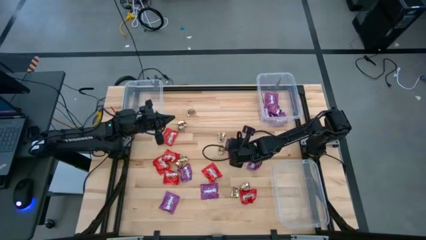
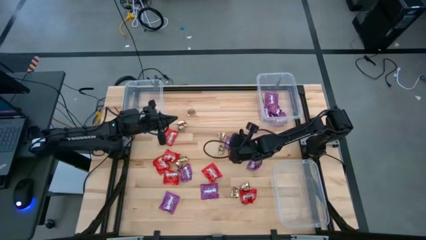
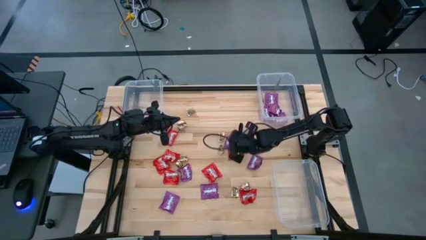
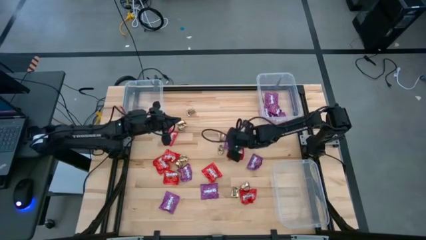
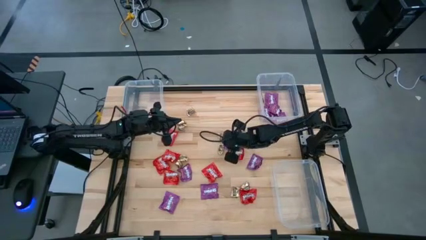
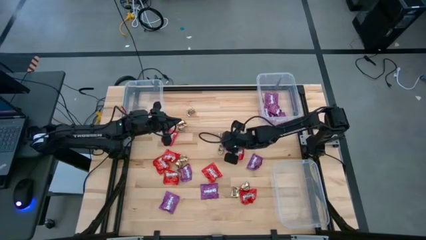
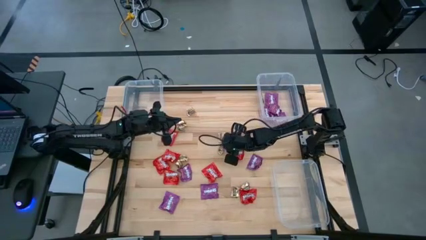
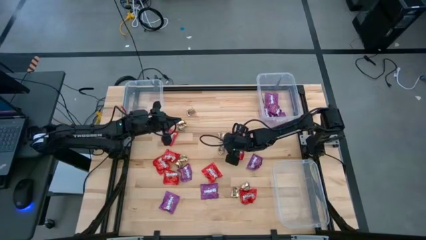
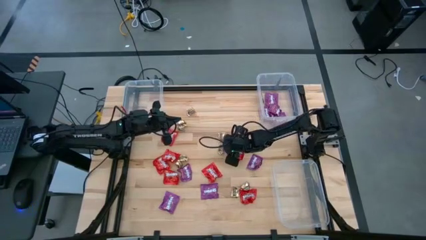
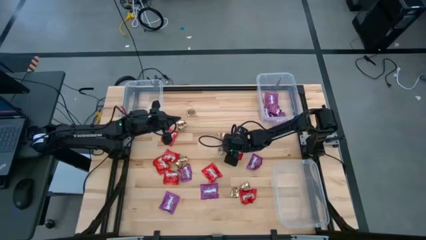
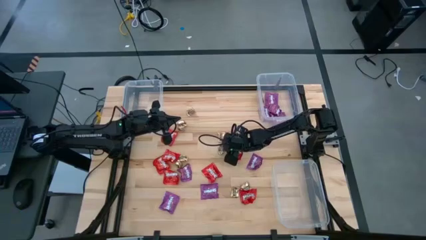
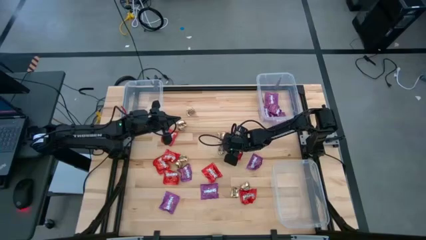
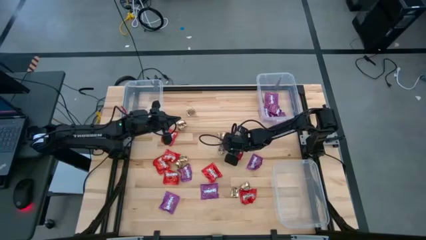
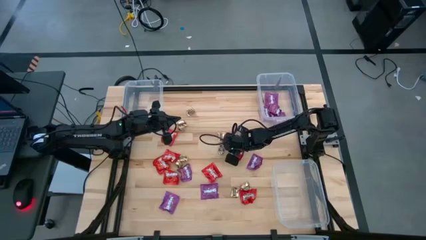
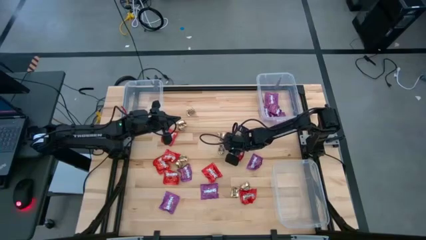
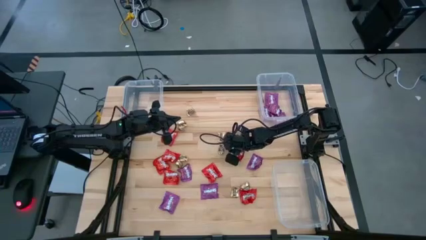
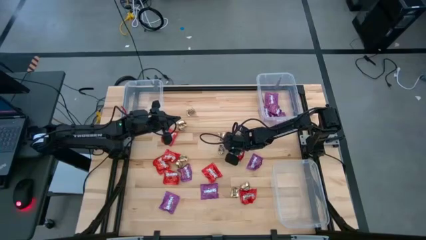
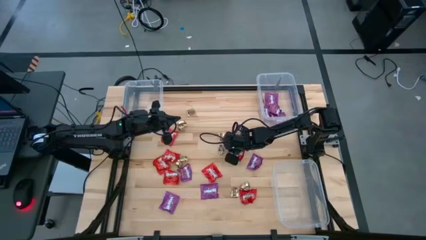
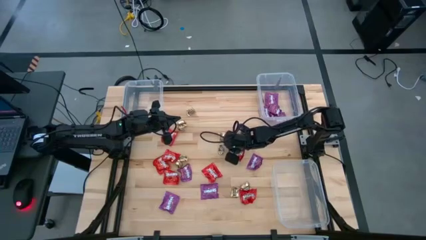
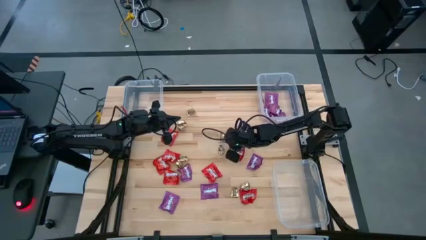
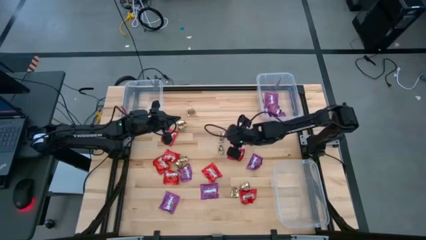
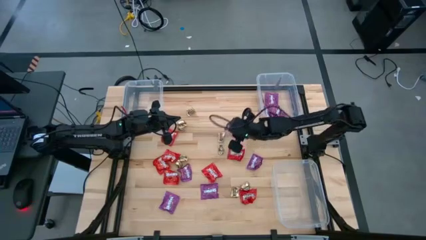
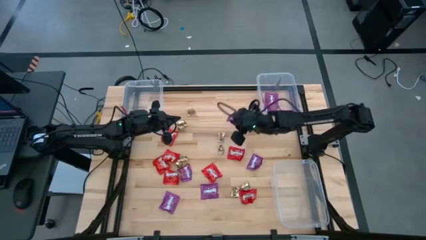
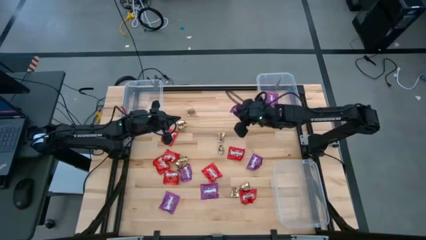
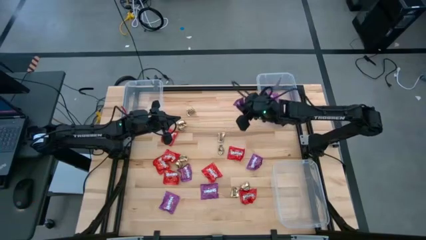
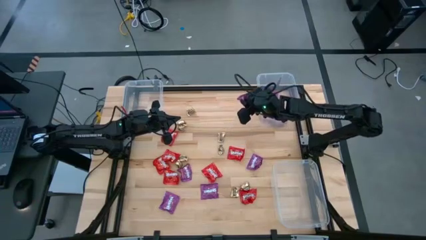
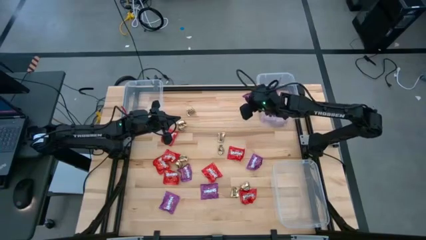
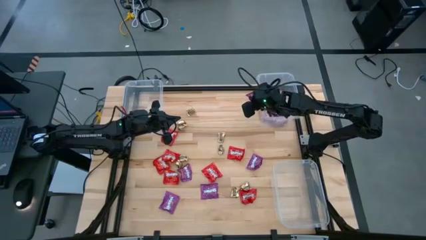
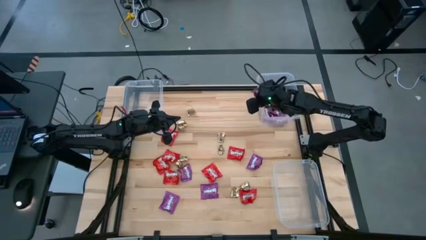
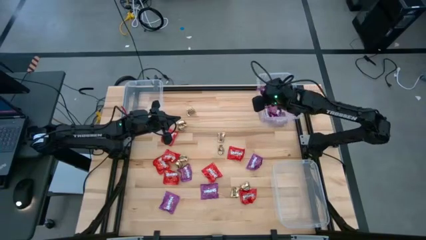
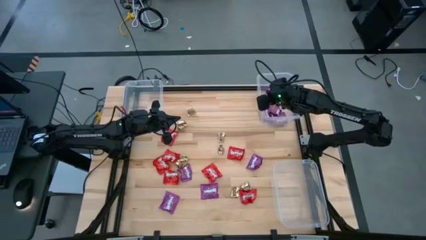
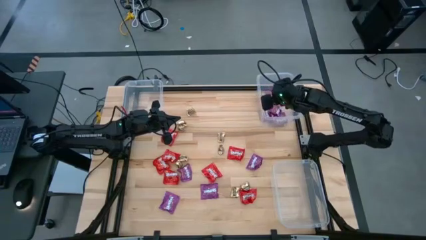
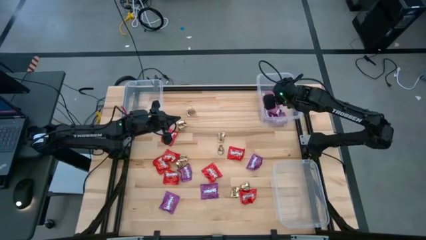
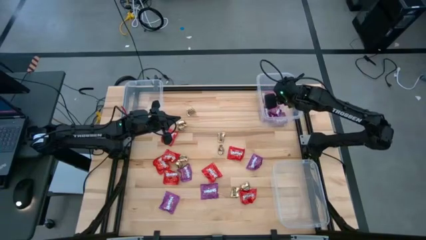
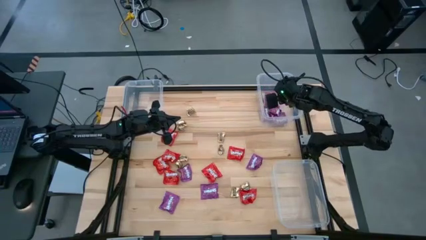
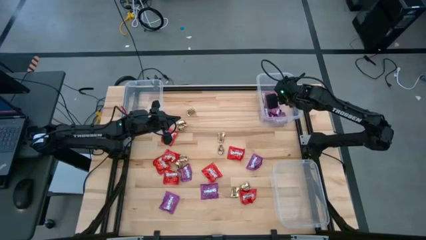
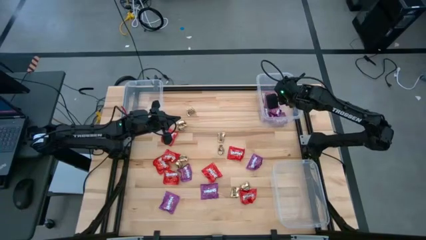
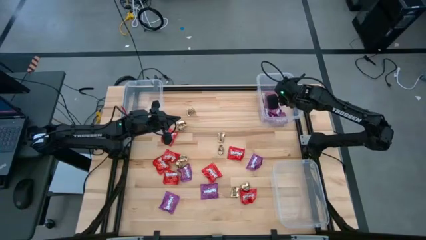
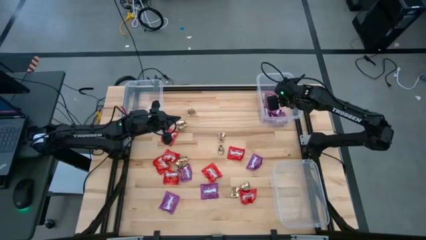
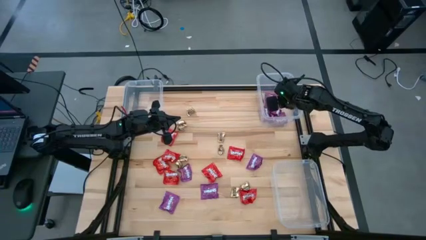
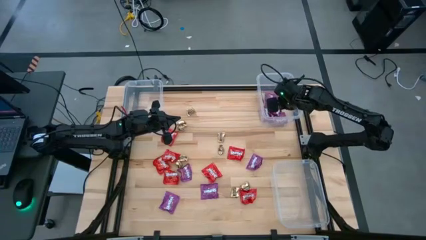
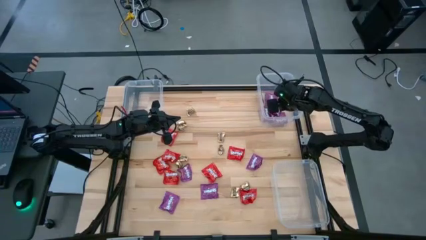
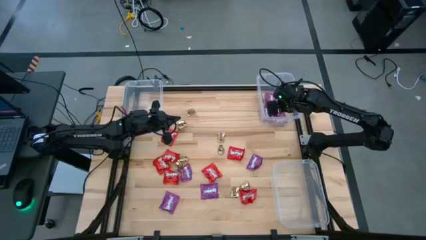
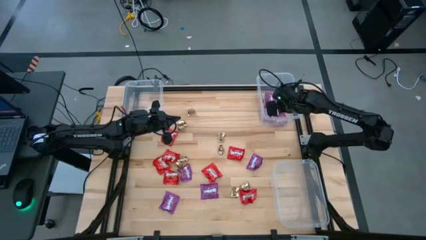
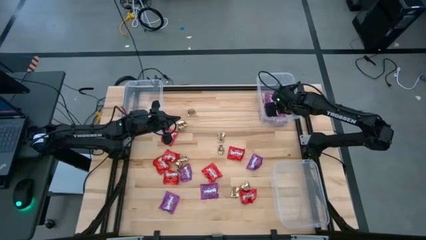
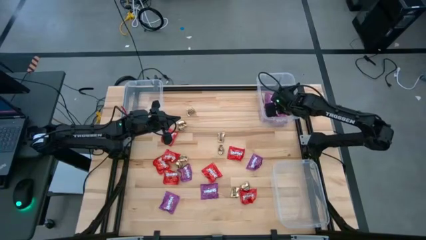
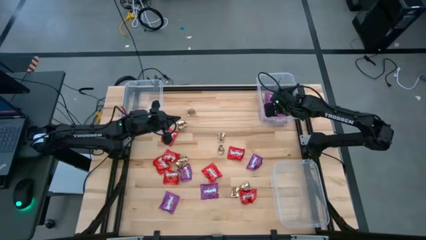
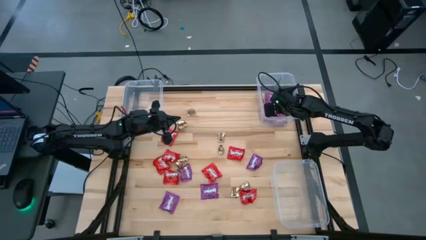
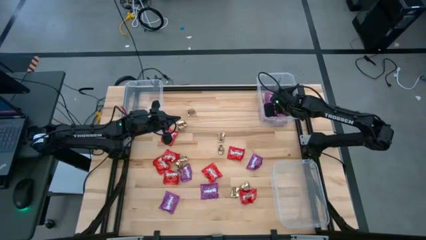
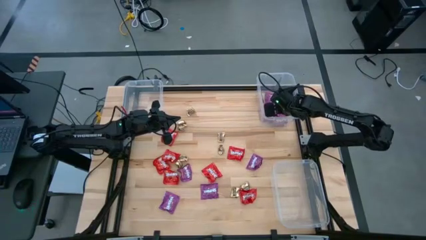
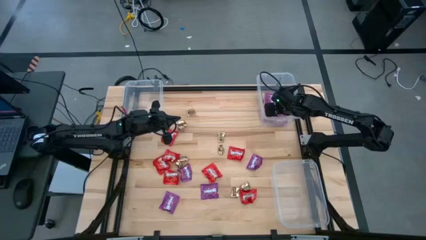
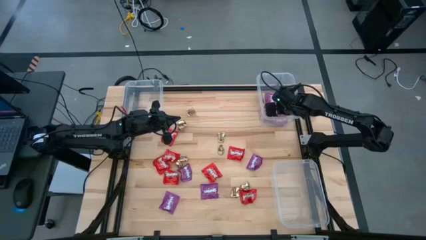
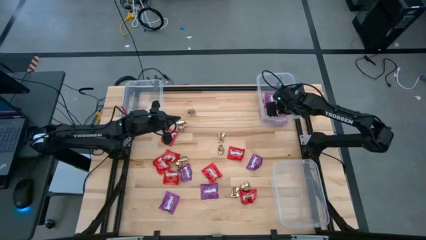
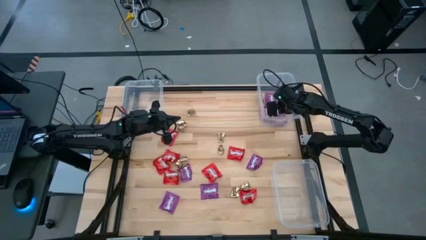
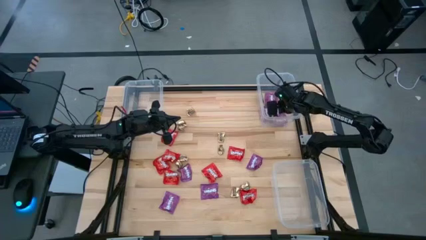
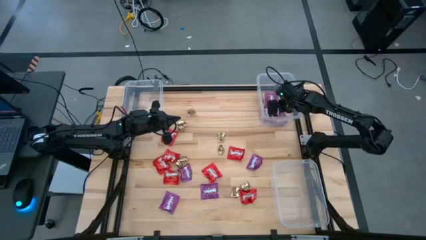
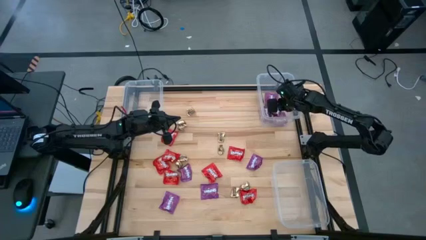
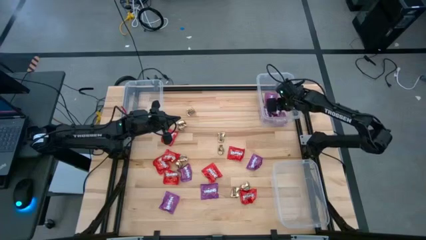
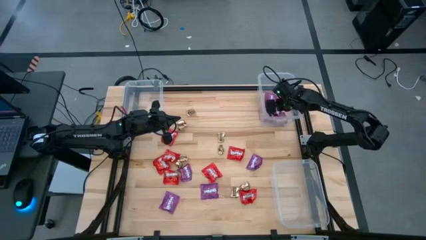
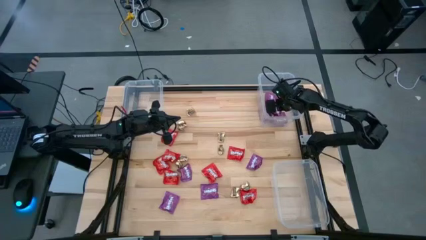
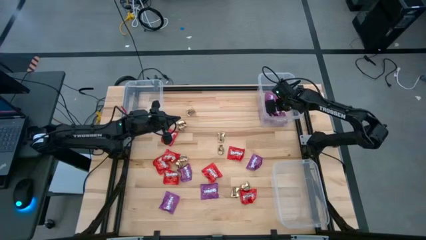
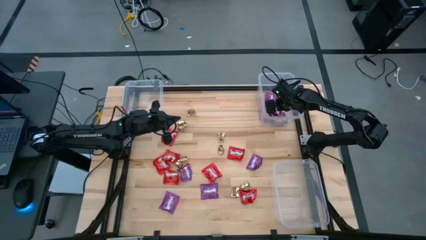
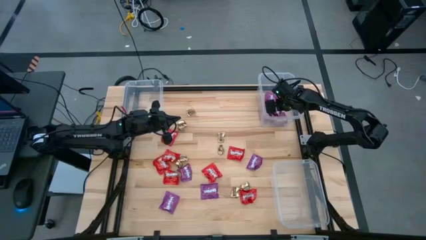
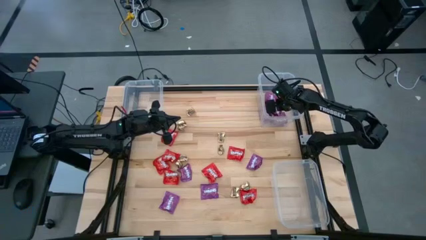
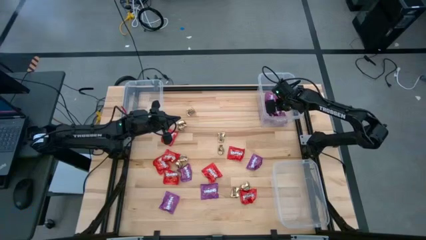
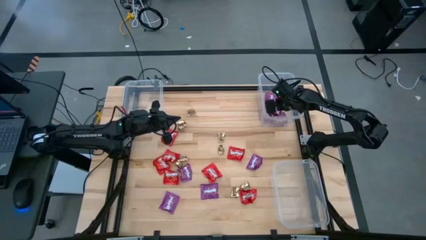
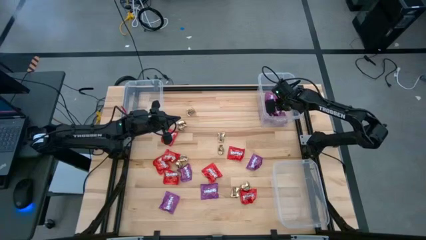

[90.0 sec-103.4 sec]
Task: Sort candy
Put the purple candy into the top right transparent bin

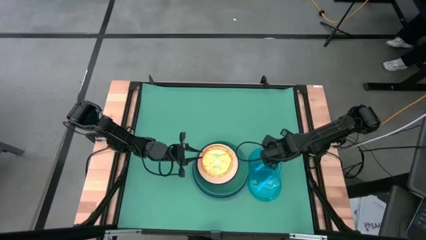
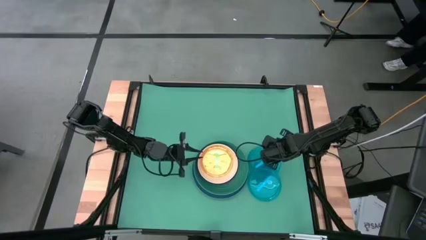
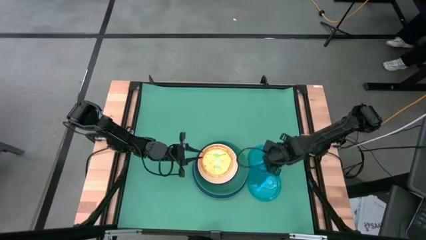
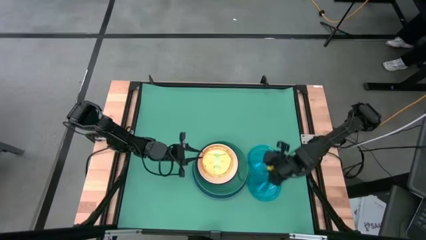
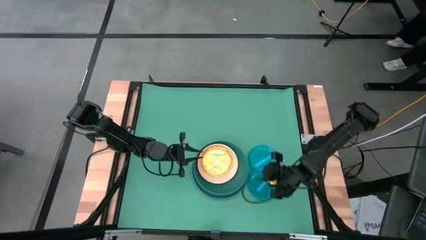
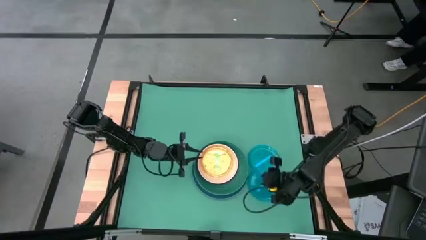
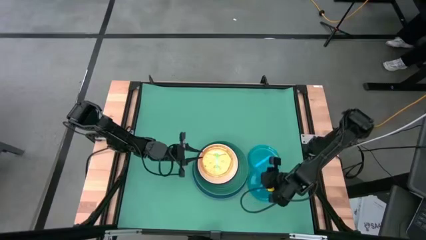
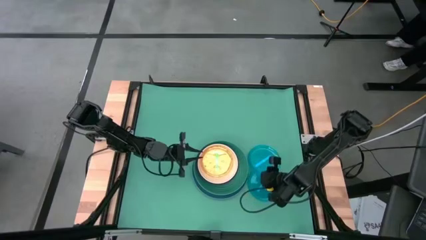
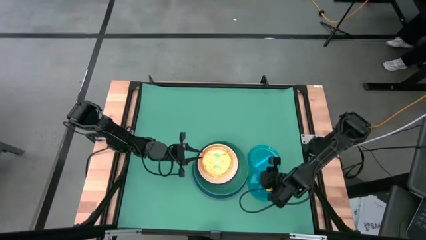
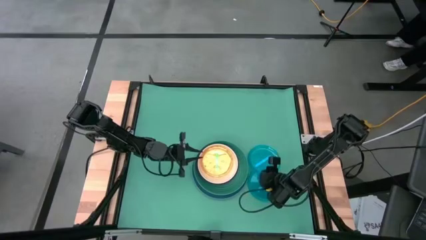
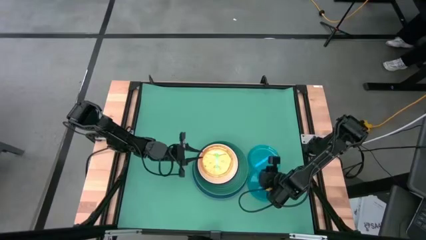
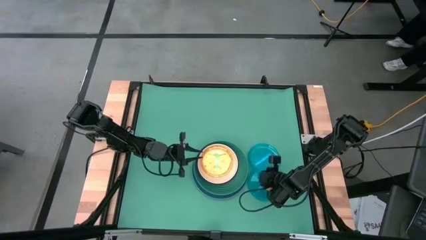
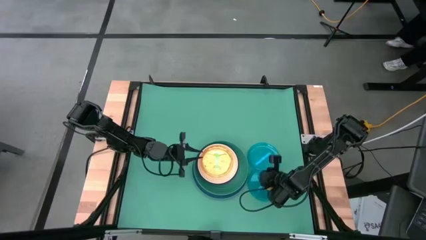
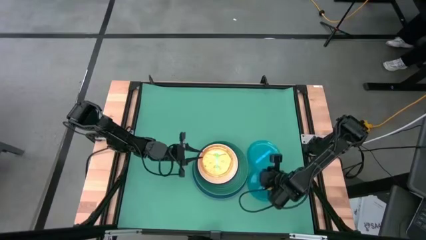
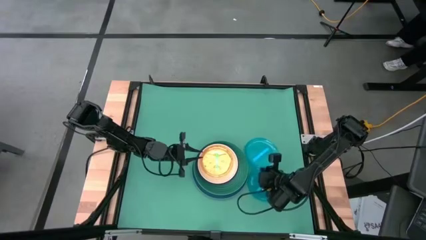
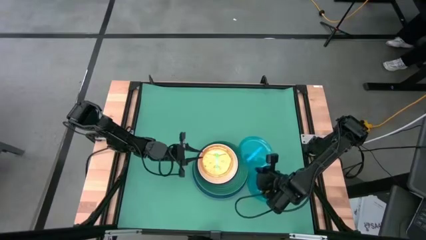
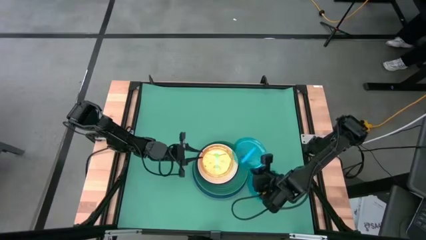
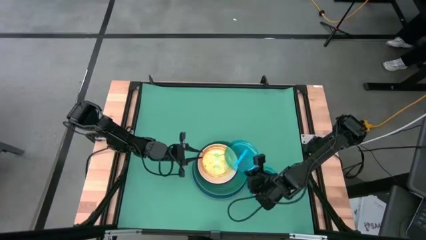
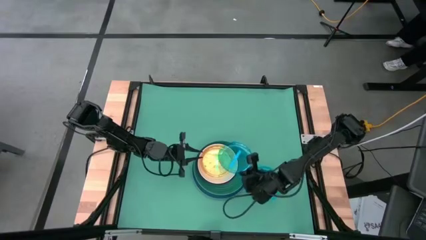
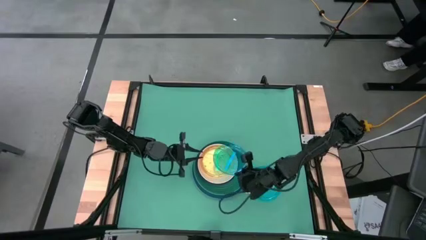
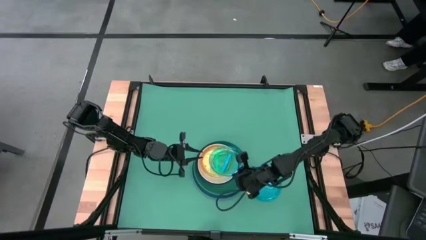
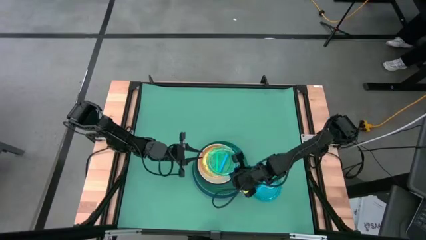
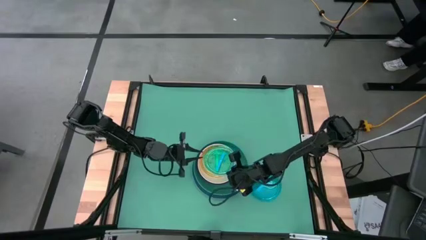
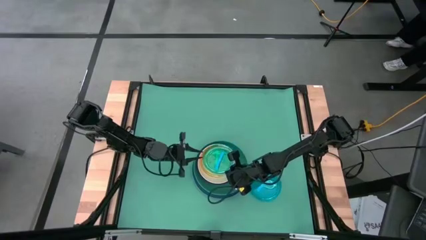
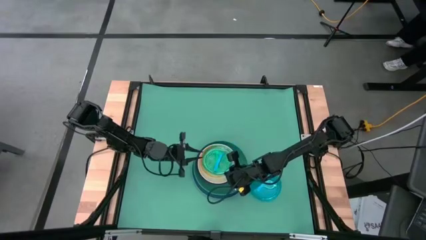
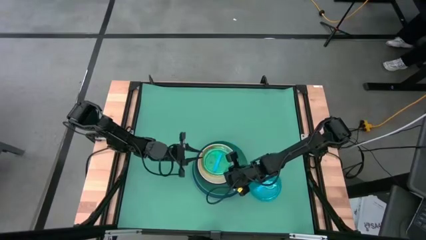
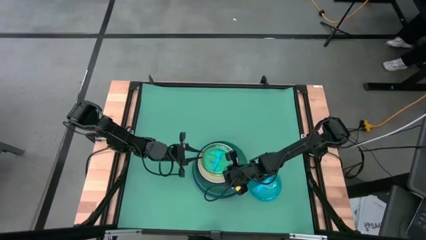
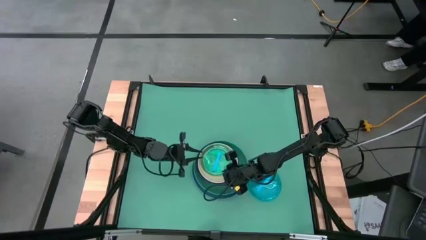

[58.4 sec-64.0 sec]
Task: Stack plastic plates
Stack the top transparent light blue plate on top of the green plate
